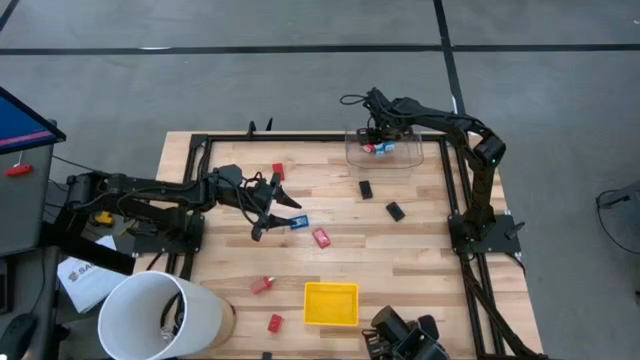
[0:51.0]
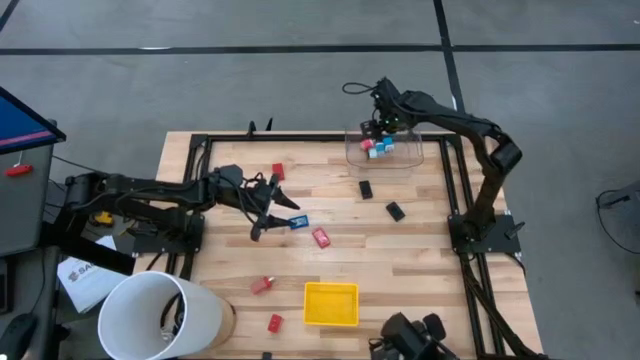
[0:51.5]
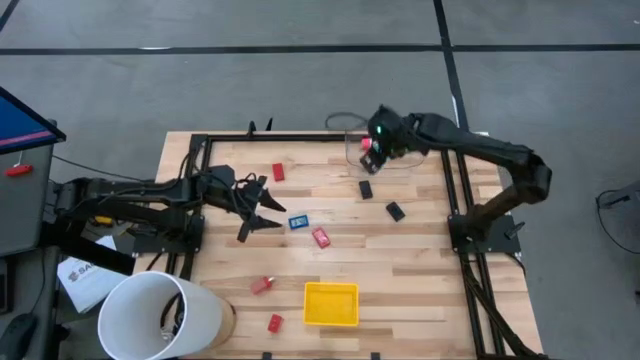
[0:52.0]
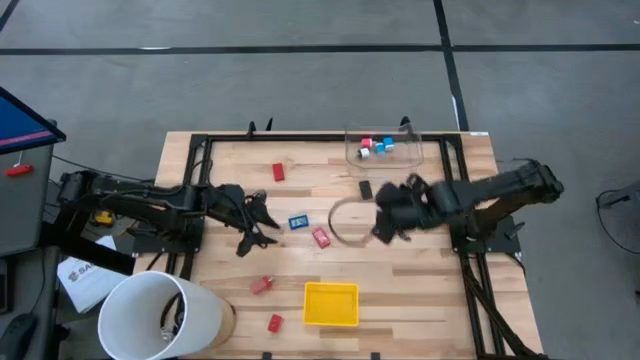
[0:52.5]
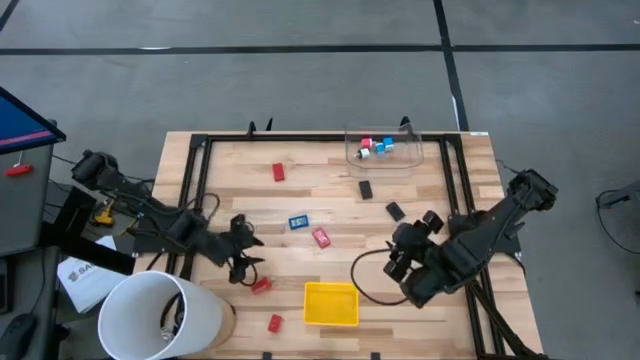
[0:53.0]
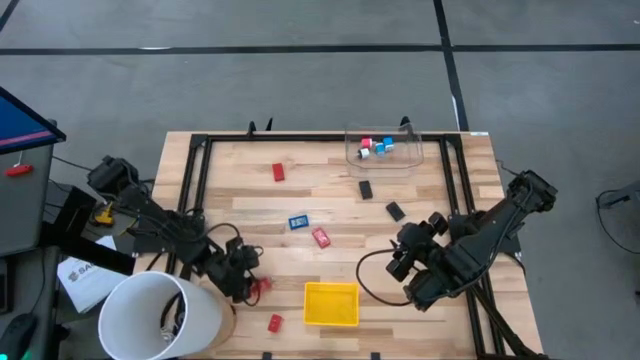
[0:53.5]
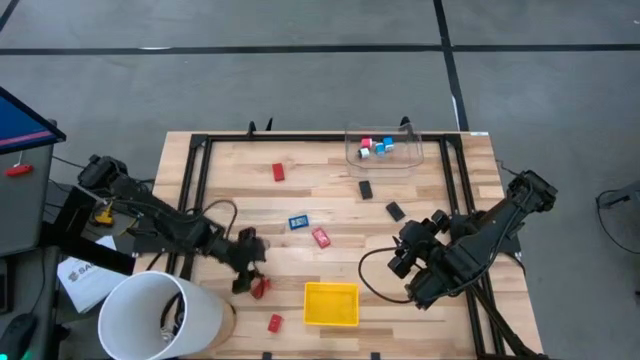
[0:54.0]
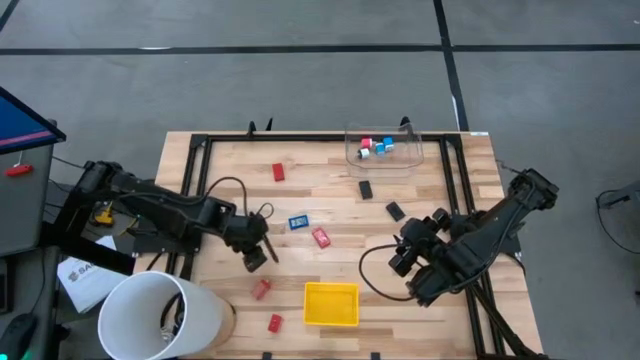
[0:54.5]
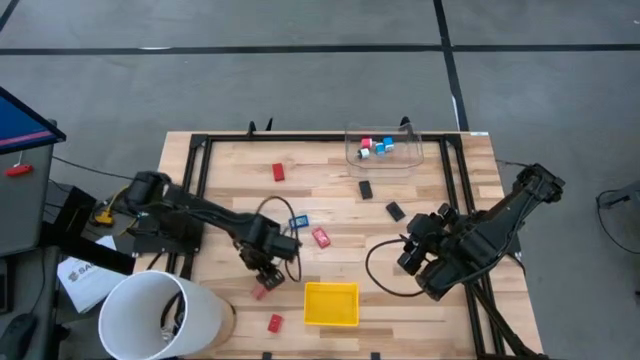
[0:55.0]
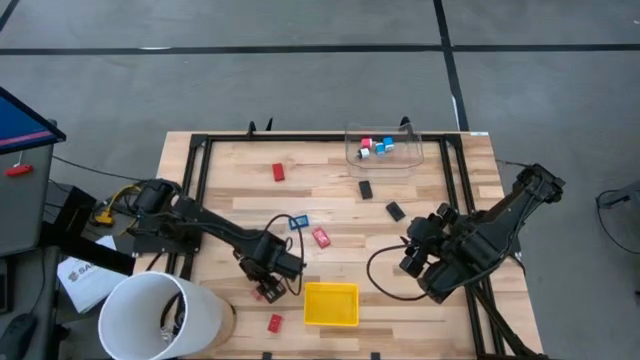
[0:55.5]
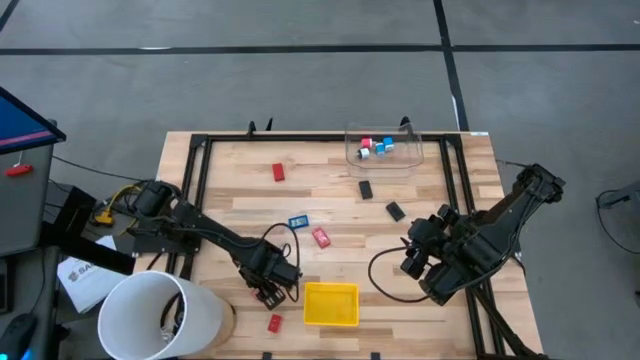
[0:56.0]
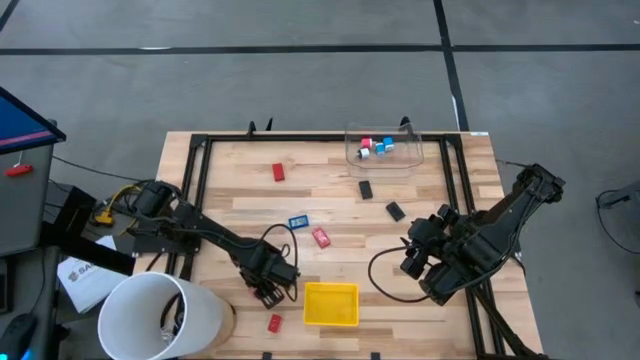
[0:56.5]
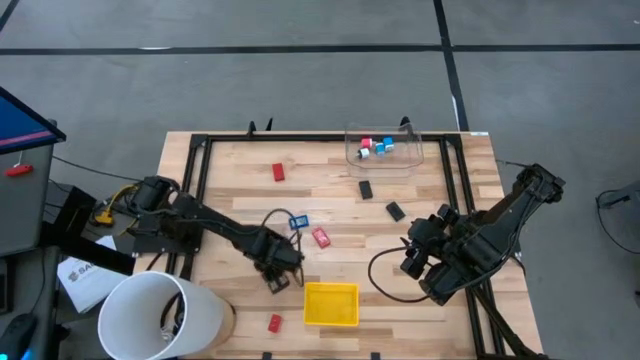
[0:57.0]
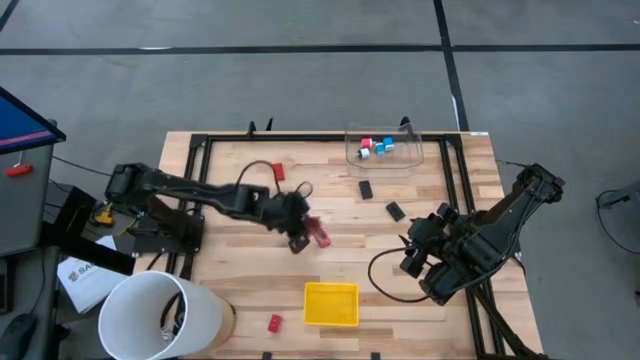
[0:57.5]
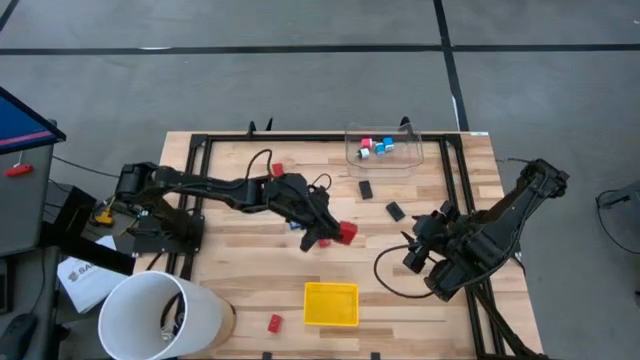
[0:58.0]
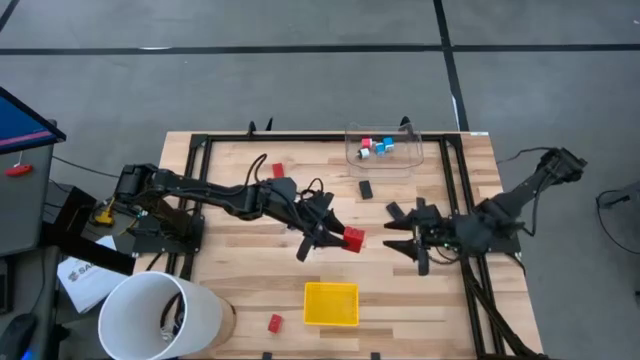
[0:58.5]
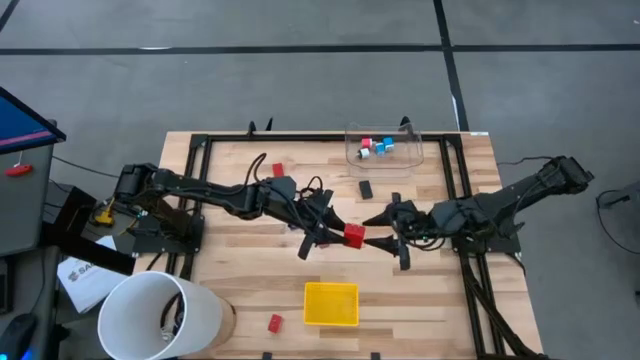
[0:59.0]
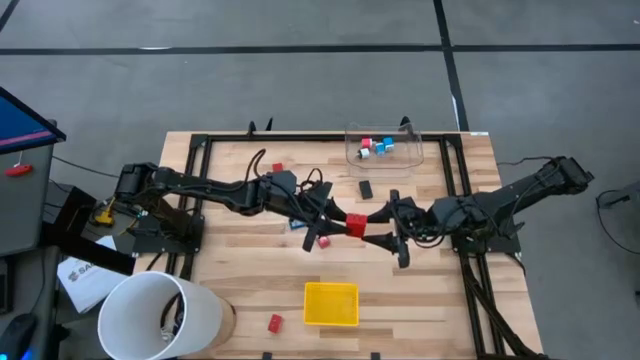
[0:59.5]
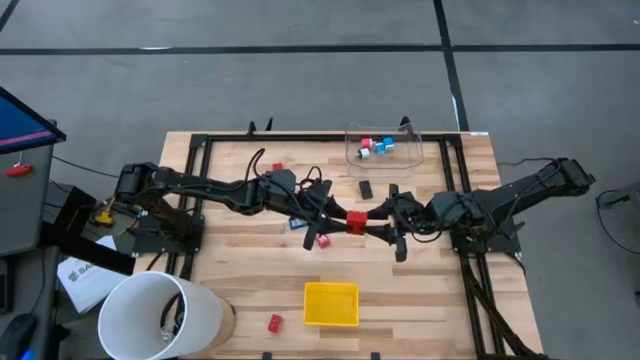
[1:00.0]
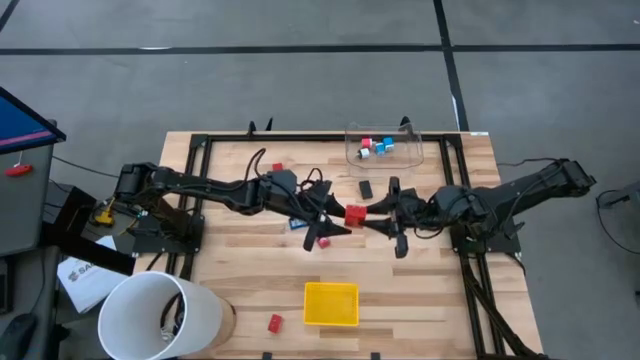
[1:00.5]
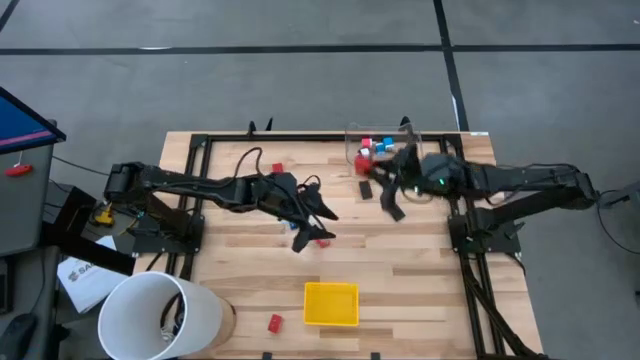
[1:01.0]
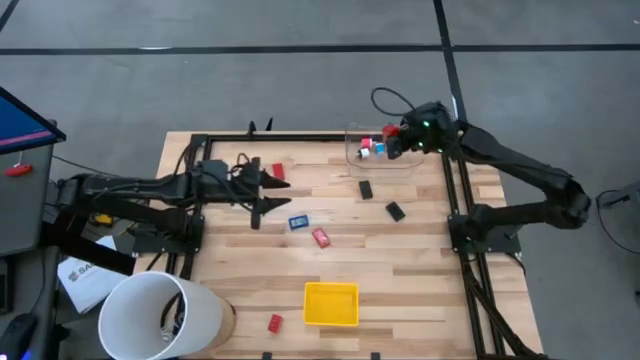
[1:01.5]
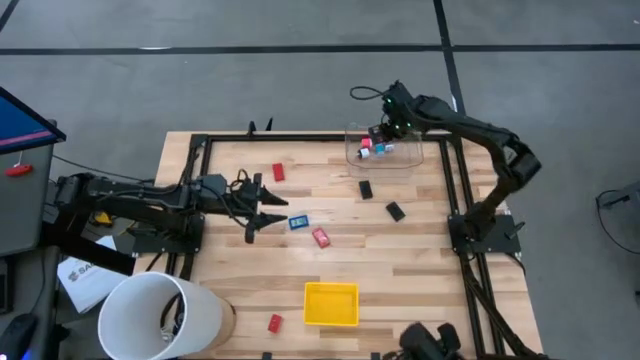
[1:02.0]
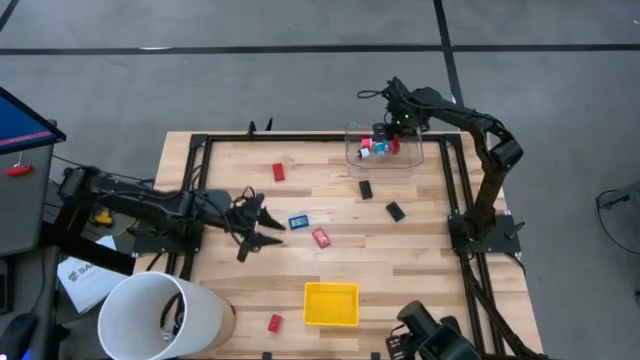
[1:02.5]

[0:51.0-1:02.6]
Task: Pick & Place Office items
Put the top left red charger adapter into the transparent bin

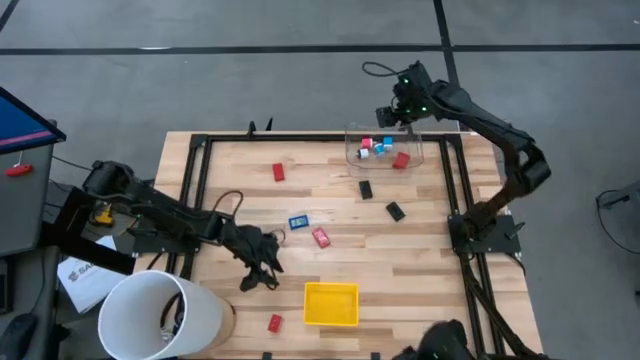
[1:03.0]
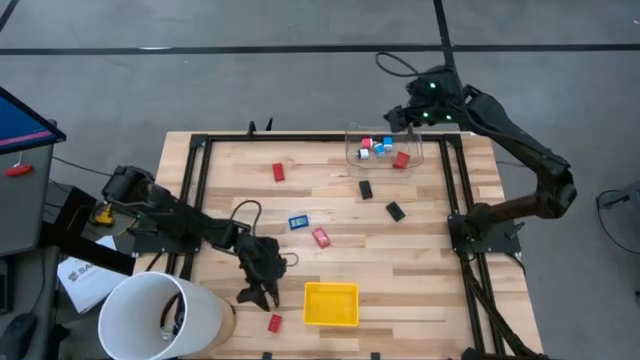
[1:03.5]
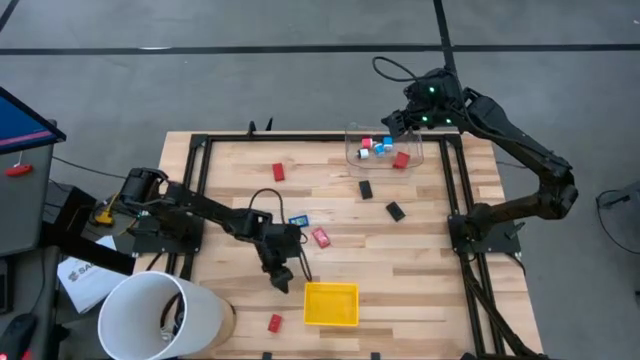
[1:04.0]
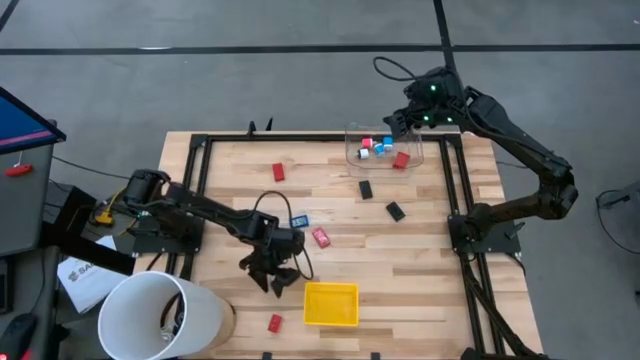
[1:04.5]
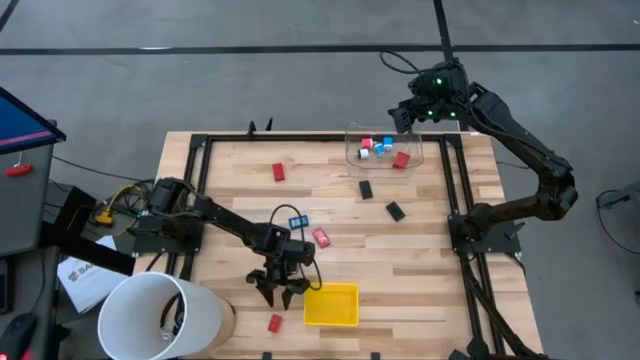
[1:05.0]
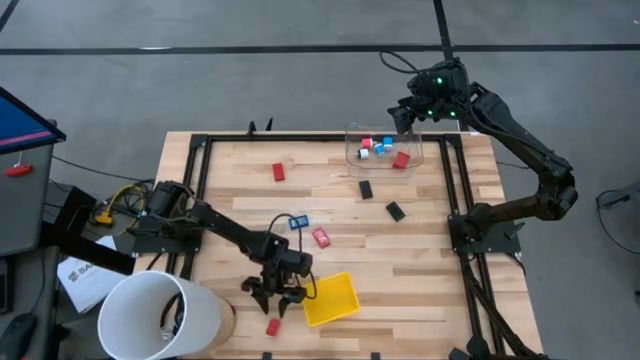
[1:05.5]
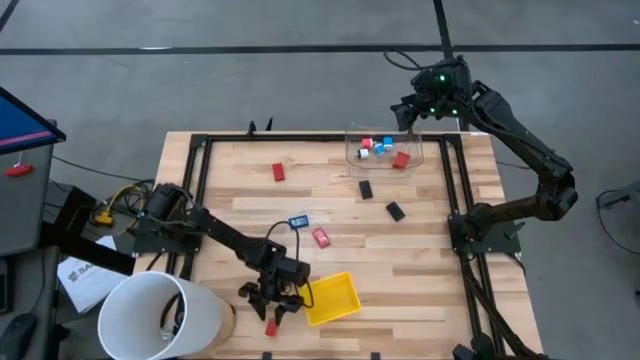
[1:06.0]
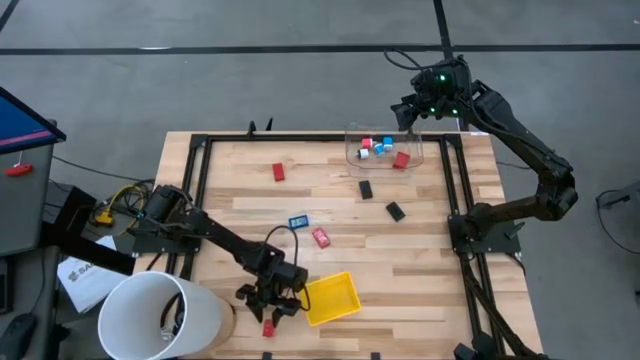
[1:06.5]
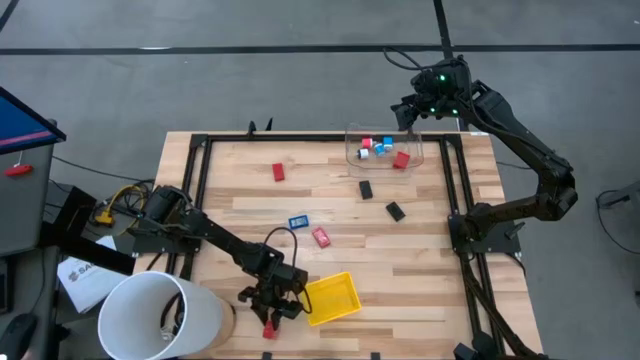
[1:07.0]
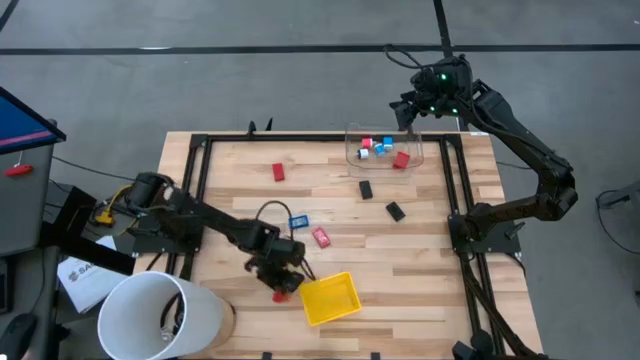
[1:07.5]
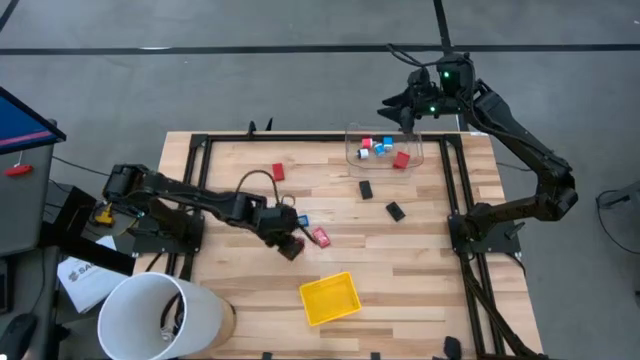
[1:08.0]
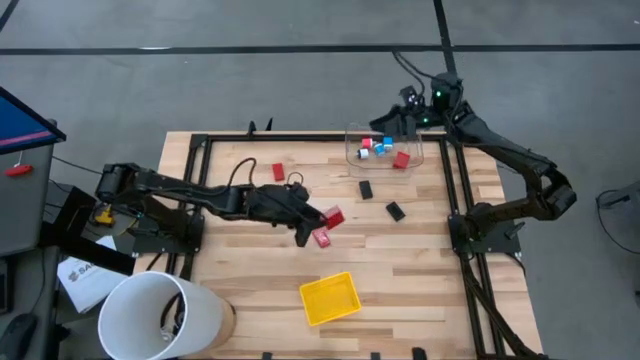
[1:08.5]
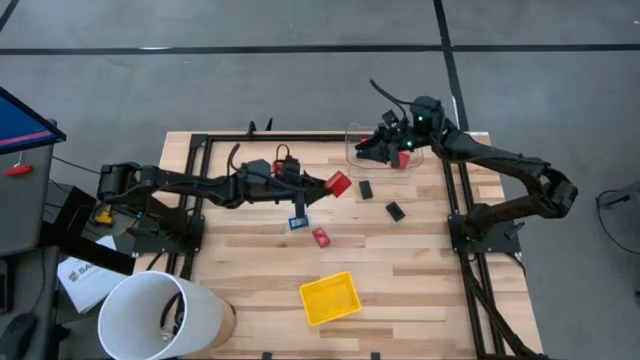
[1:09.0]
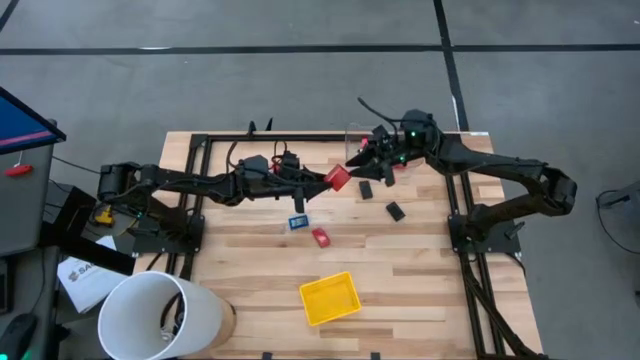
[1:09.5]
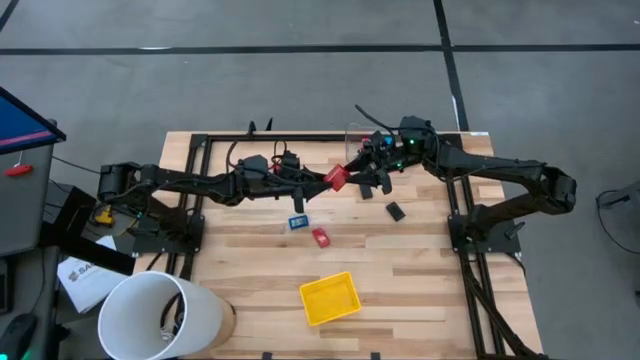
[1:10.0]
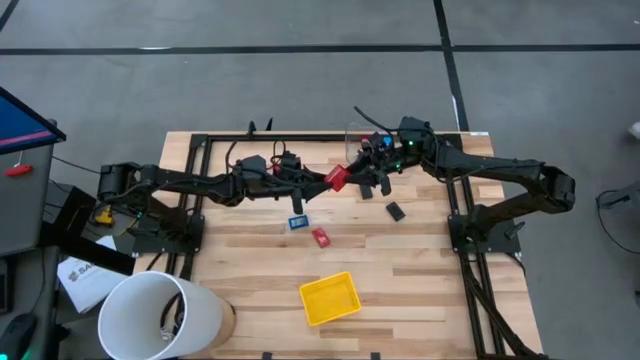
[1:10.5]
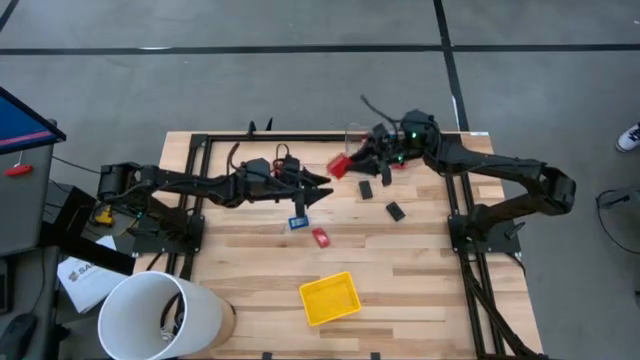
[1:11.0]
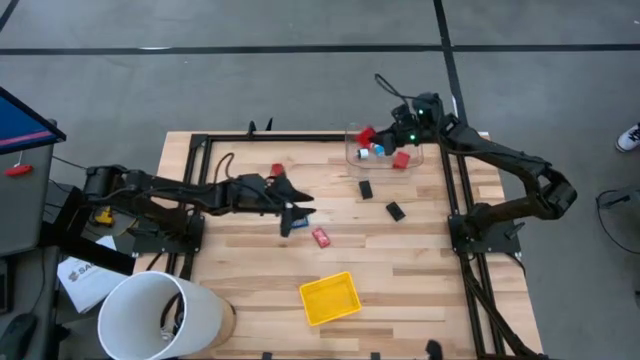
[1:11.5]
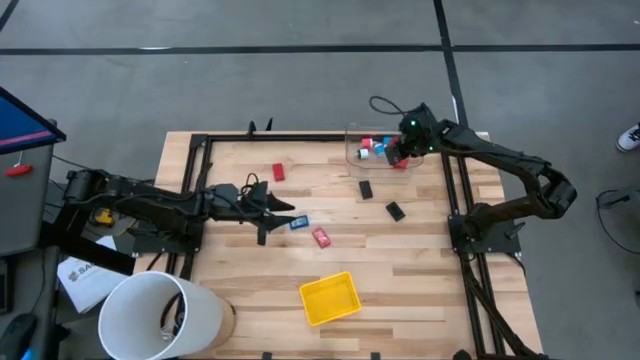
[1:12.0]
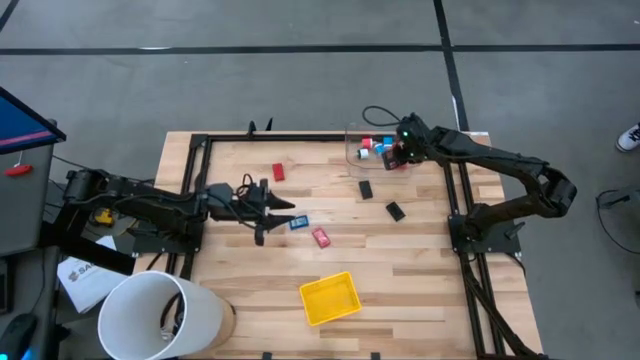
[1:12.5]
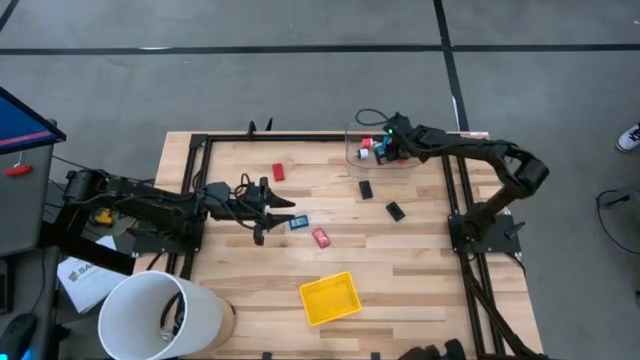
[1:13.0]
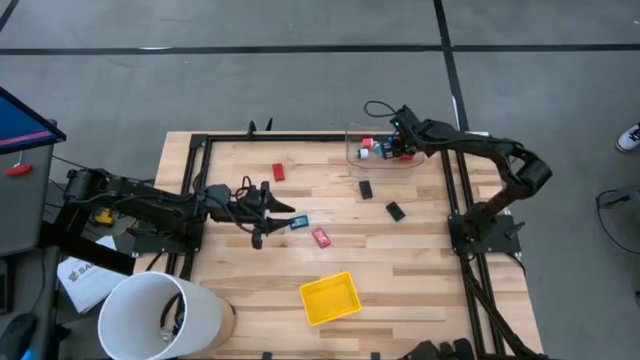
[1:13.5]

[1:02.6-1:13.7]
Put the red charger adapter into the transparent bin
